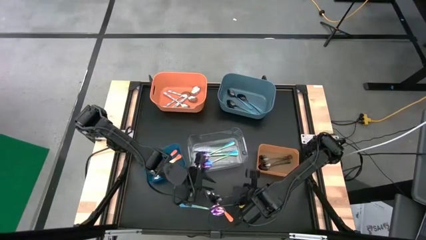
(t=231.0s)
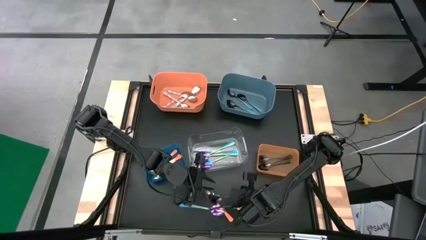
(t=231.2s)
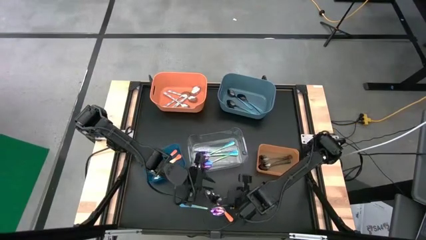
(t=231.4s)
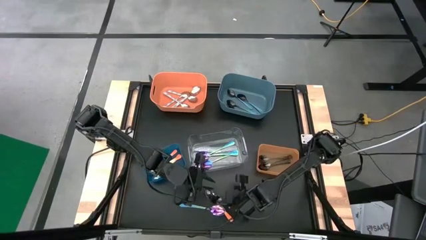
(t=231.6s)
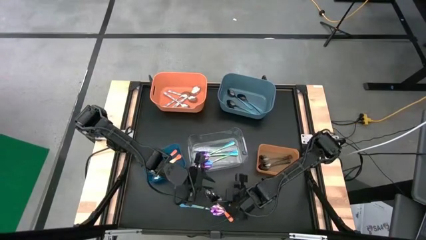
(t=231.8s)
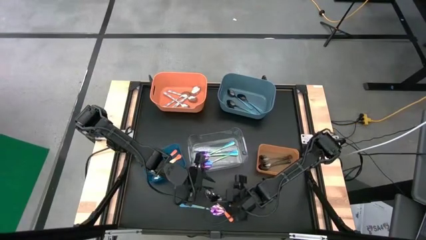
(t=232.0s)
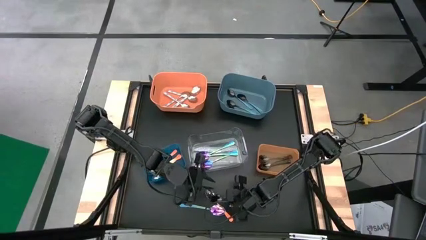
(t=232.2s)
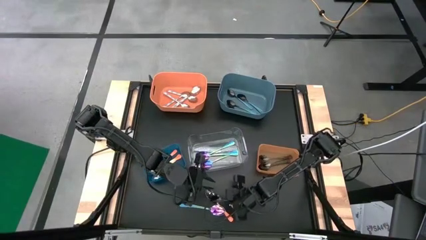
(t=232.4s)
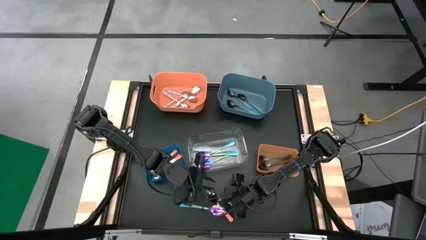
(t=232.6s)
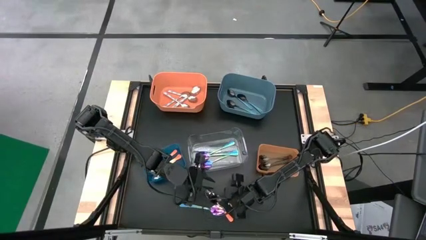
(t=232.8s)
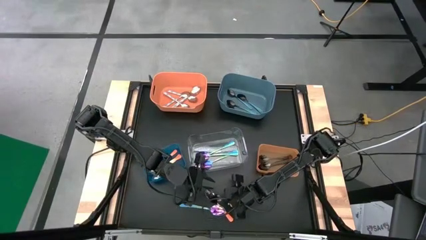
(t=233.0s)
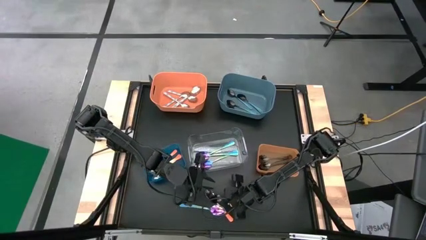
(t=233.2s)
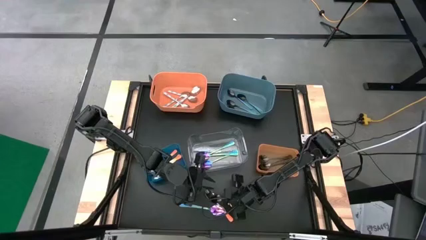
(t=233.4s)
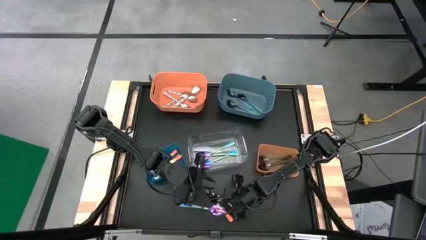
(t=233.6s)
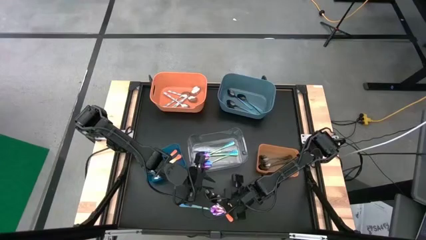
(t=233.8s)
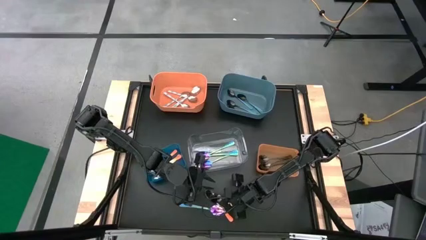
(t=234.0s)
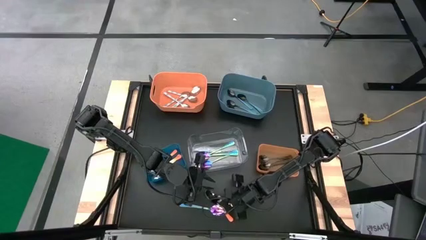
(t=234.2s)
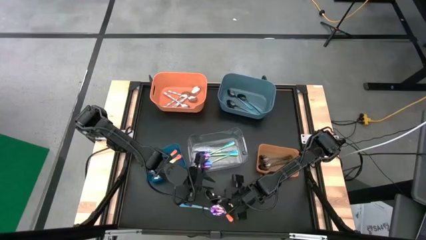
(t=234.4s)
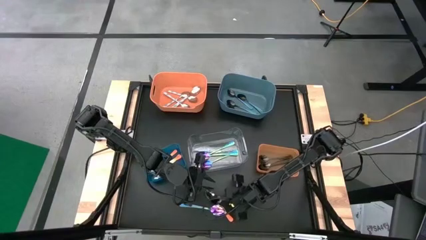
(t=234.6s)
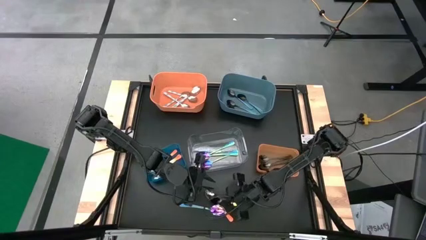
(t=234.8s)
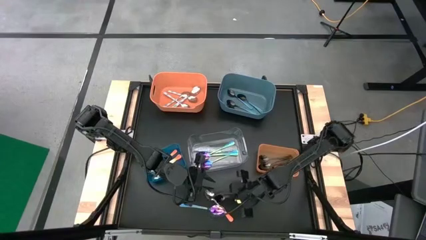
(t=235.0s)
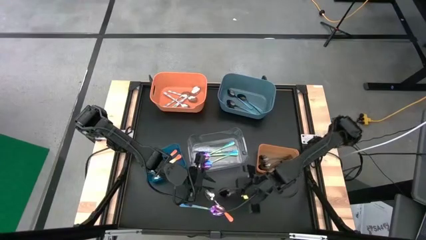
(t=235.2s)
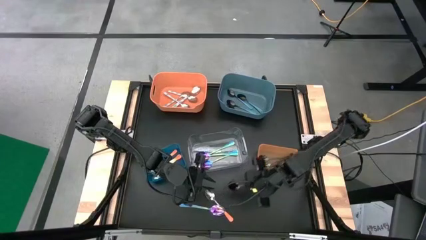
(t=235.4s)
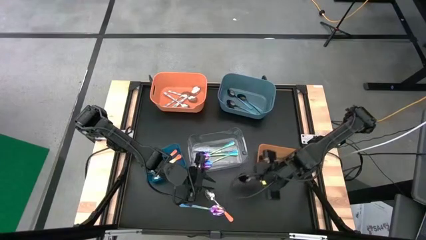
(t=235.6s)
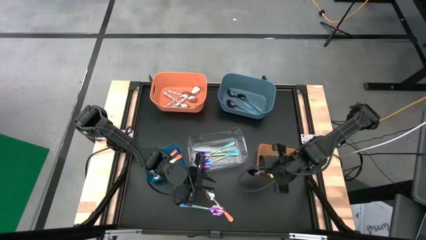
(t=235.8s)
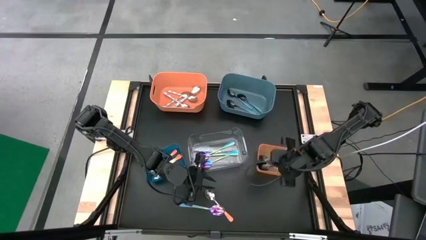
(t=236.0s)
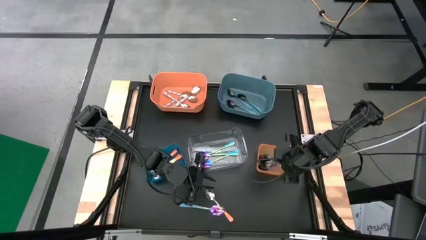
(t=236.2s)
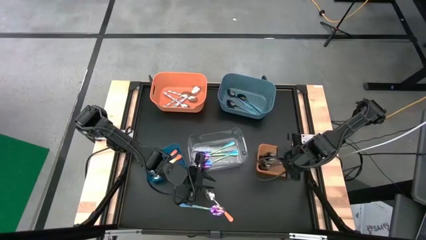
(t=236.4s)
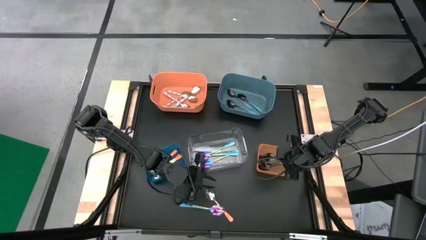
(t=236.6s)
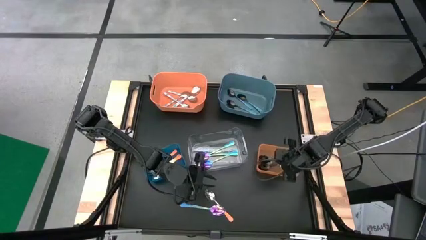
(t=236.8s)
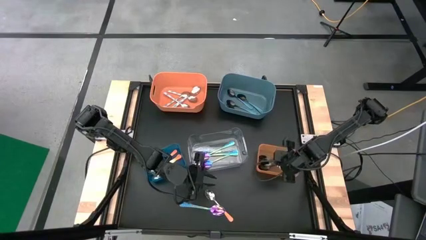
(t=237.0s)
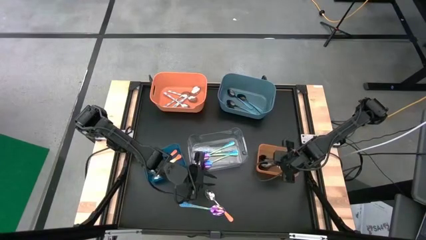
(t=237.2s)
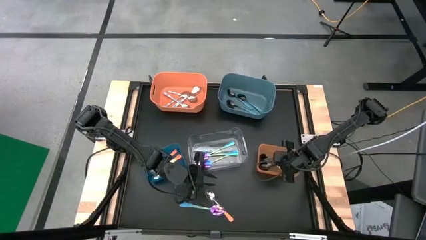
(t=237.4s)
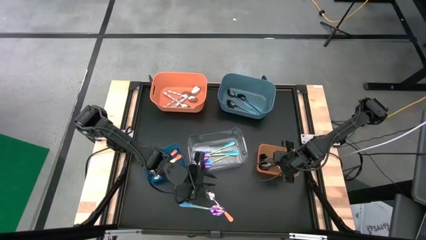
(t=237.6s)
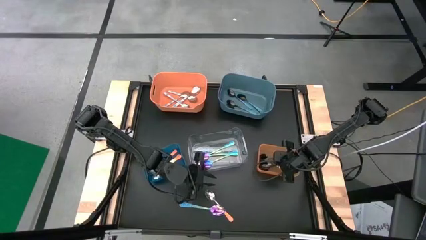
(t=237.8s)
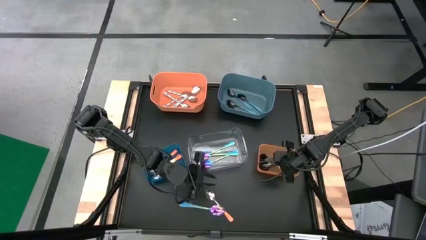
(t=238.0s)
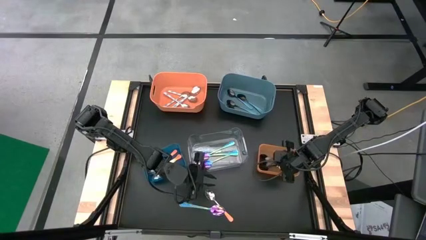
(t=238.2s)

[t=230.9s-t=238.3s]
Task: Sort silverware by color (type)
Put the black spoon into the light orange bin

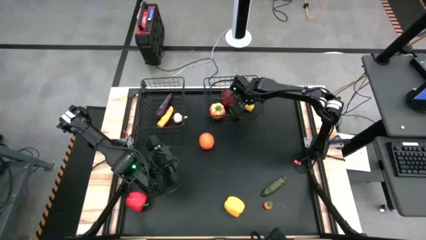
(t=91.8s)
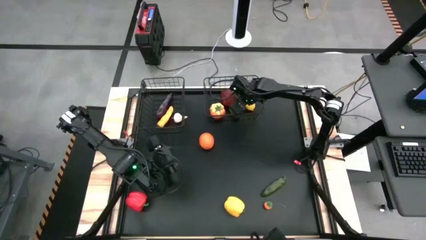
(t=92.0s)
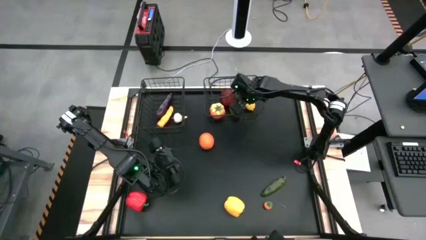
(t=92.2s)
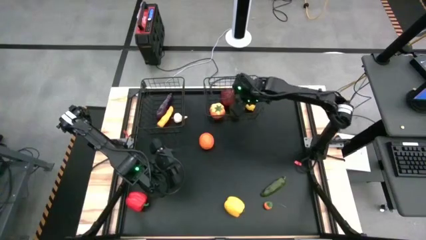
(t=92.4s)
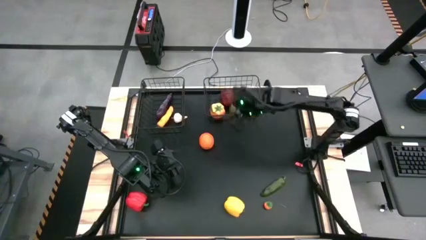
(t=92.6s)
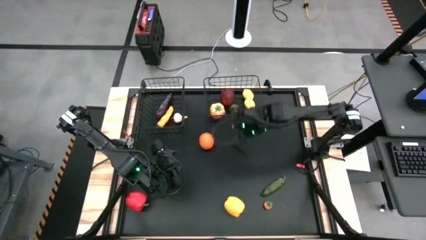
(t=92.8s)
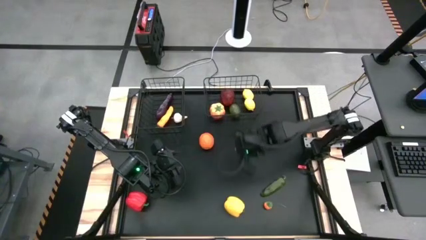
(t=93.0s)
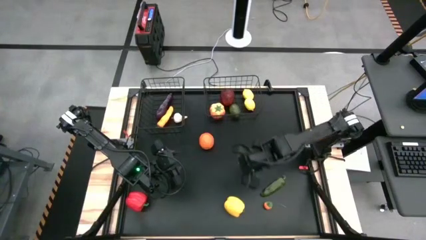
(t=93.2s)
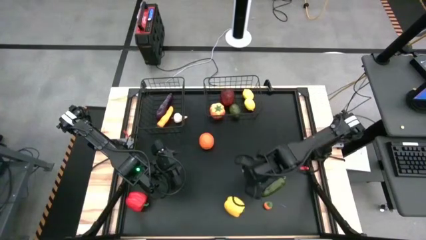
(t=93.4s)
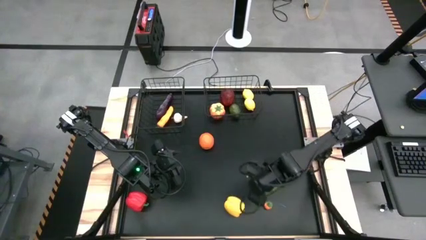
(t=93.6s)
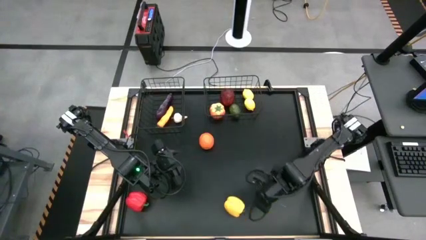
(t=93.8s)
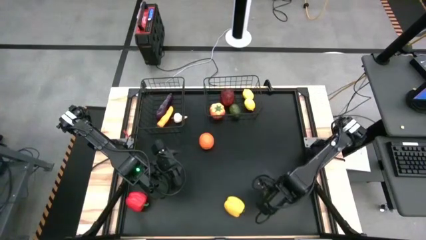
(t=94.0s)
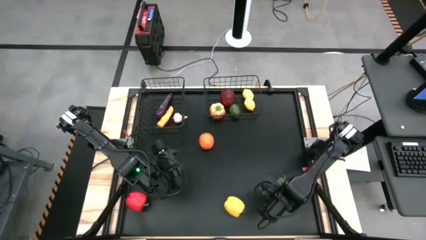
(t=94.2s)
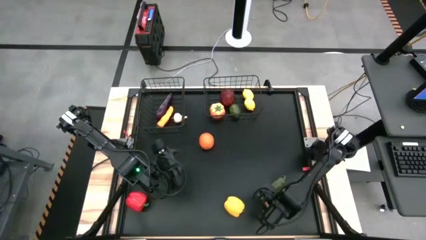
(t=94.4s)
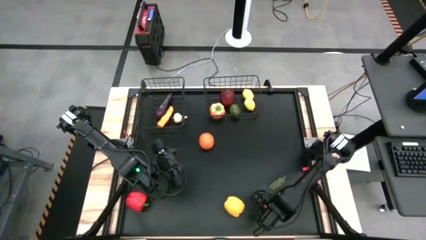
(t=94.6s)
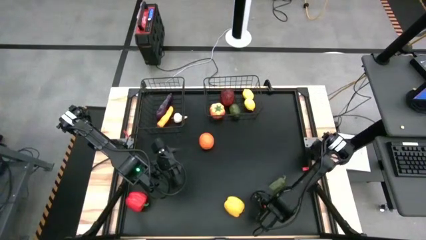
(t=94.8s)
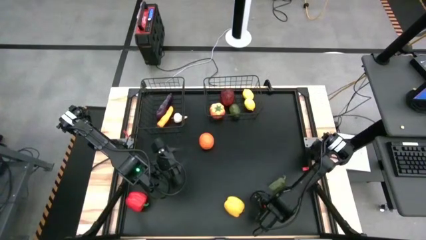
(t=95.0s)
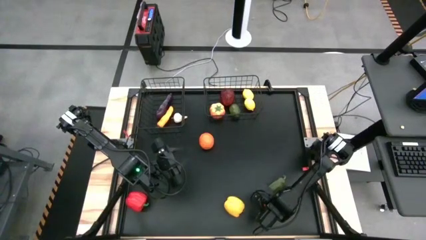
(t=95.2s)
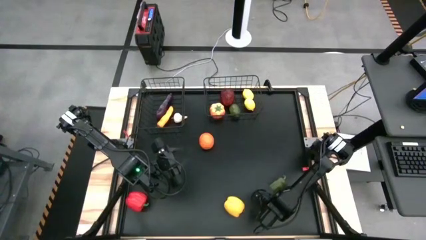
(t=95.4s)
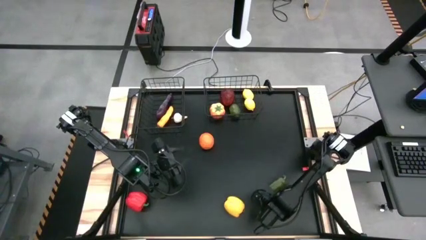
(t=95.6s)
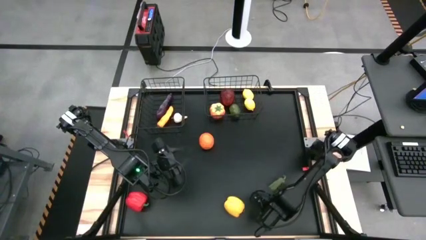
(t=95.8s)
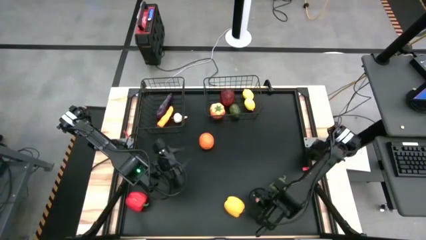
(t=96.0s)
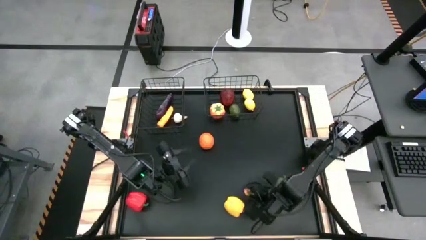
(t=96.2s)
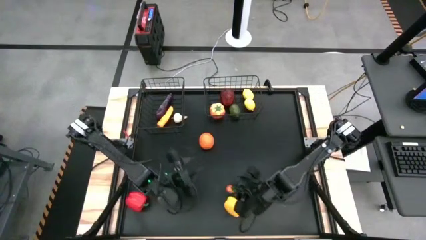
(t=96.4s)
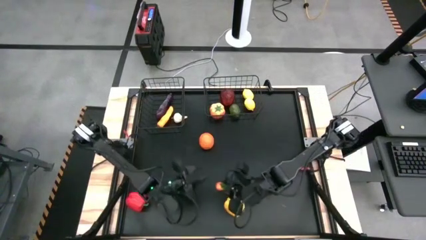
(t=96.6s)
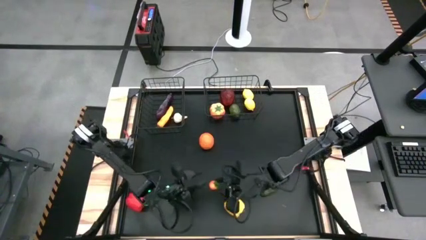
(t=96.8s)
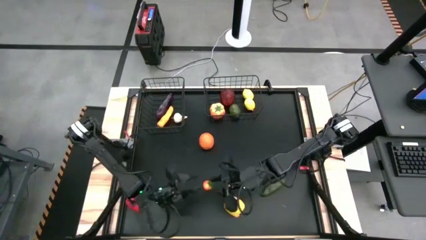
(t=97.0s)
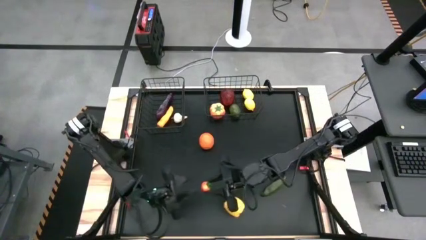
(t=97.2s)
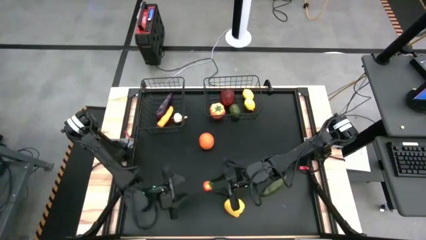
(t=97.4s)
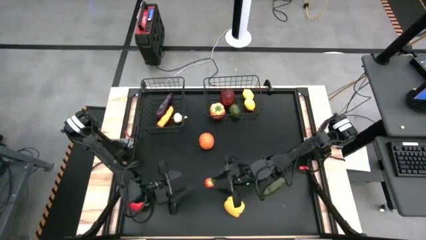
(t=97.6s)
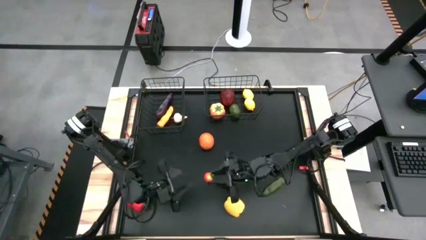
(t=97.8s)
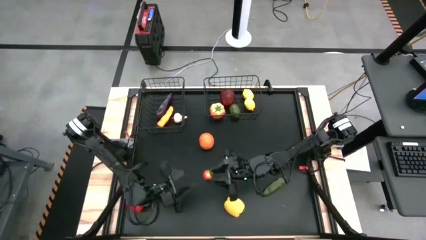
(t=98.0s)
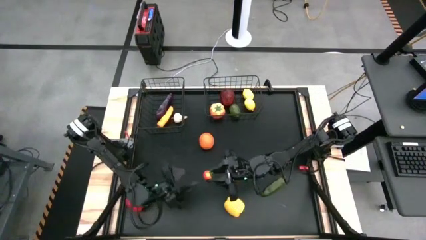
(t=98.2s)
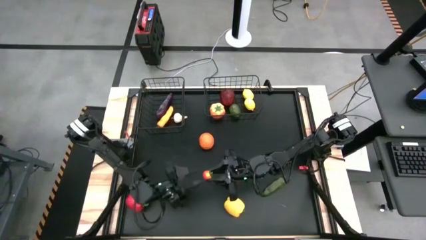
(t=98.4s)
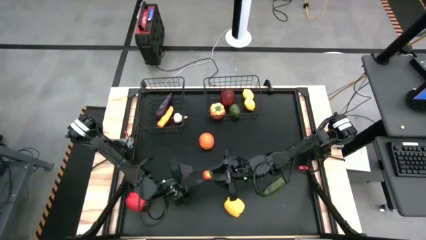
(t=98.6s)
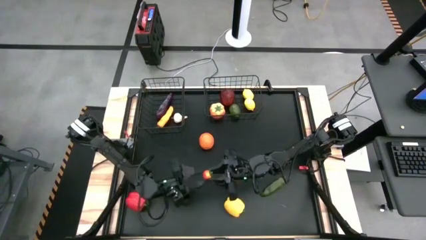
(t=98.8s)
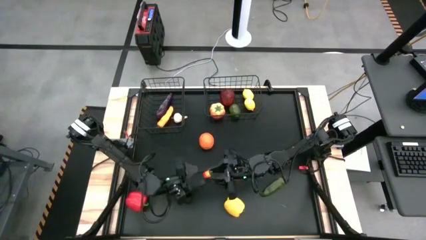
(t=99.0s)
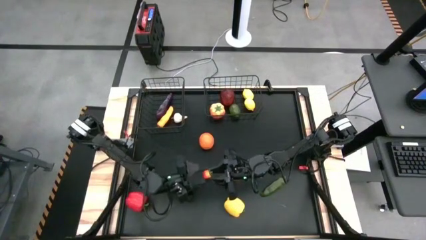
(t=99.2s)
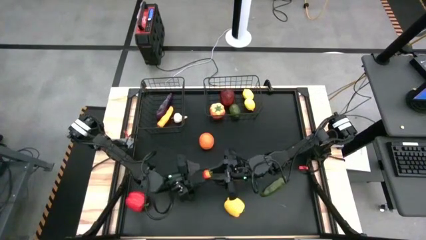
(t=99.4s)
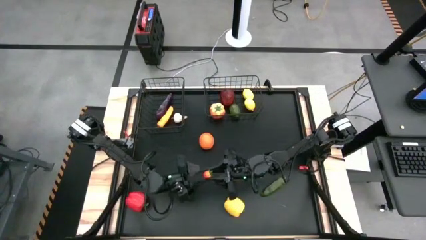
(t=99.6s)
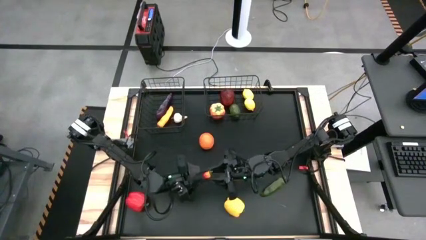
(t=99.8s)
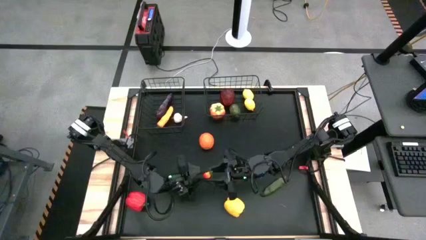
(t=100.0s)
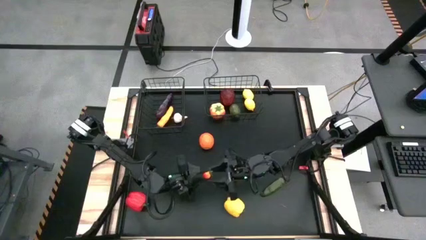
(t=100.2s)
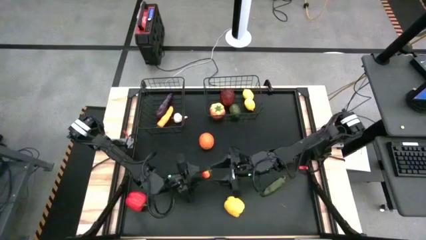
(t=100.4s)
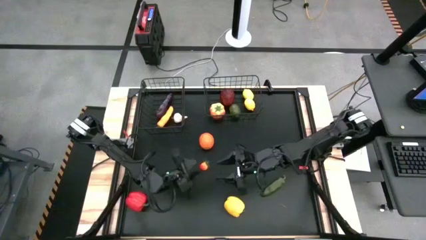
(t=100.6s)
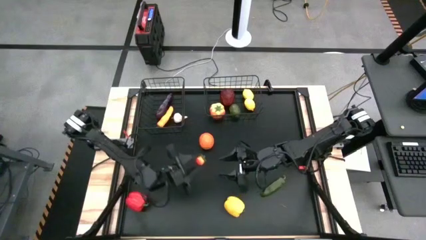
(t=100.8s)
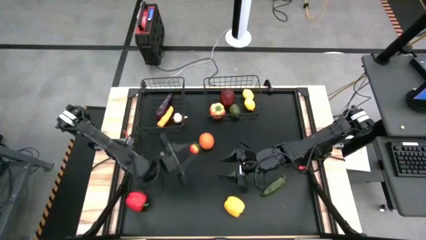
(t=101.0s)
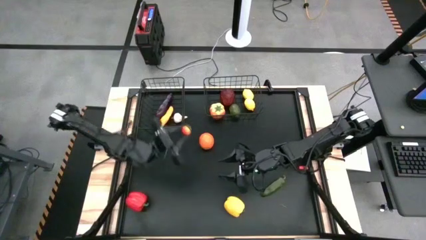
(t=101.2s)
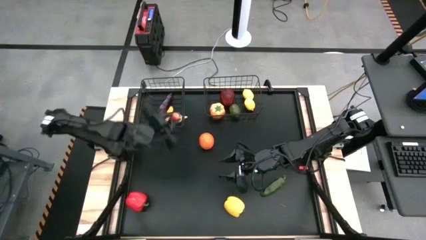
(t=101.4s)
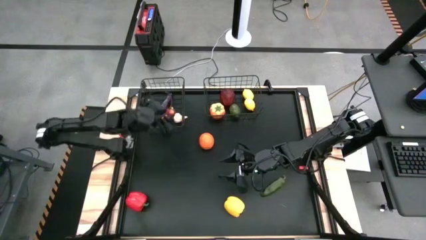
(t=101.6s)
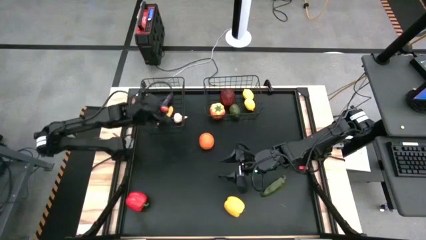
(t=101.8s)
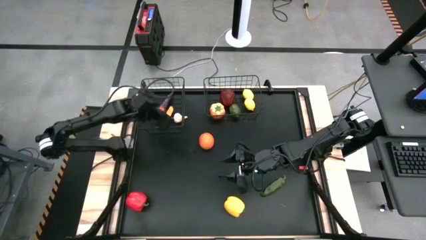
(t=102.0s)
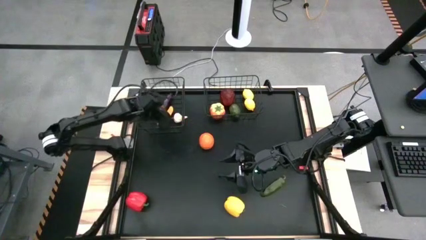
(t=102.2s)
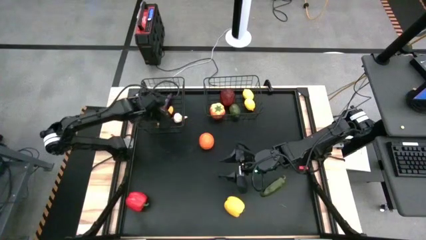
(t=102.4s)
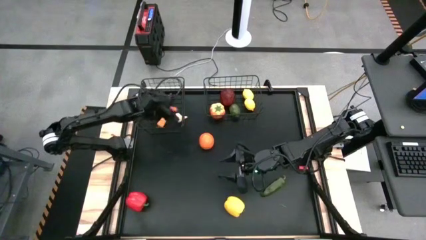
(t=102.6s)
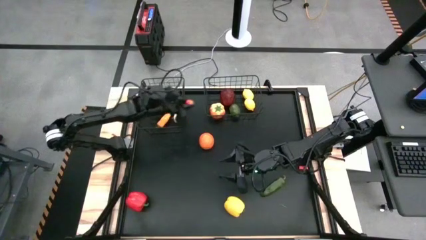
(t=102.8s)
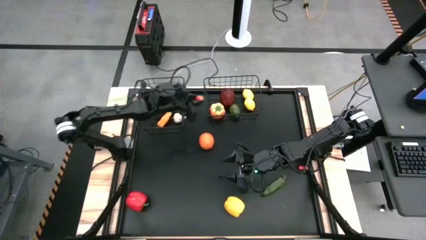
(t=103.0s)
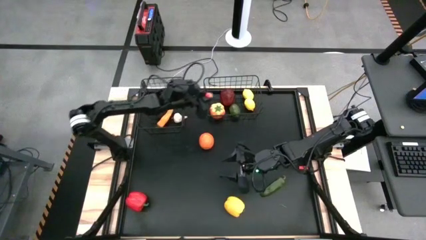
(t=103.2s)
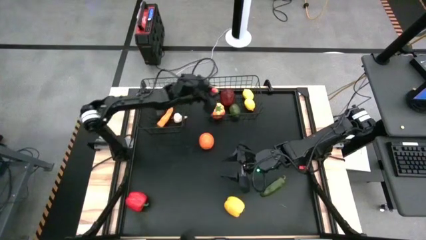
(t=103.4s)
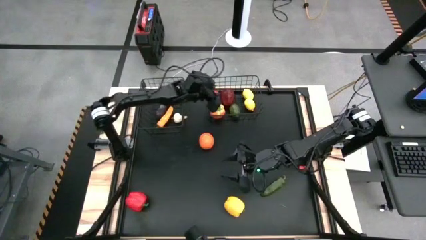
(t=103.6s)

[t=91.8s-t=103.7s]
Task: Sort produce into baskets
Put the red tomato into the right black wire basket
